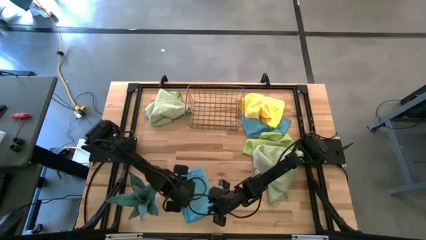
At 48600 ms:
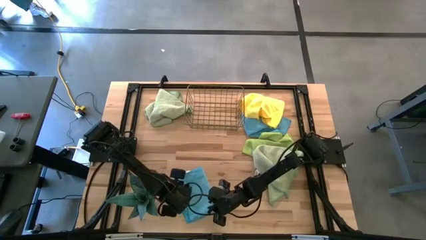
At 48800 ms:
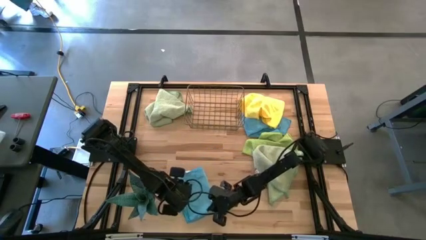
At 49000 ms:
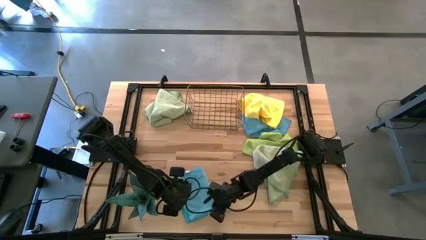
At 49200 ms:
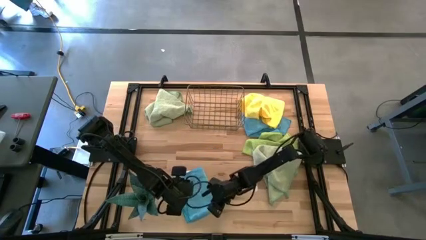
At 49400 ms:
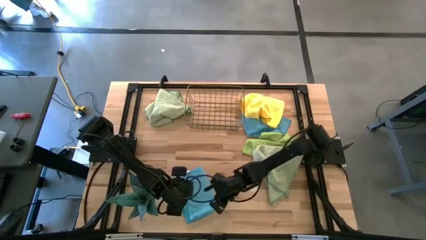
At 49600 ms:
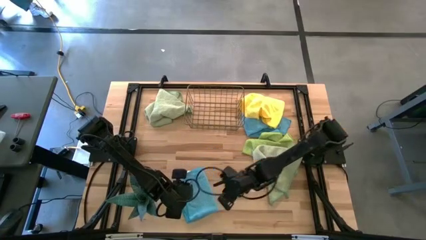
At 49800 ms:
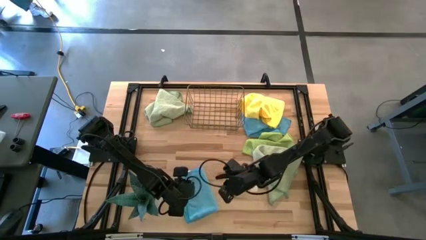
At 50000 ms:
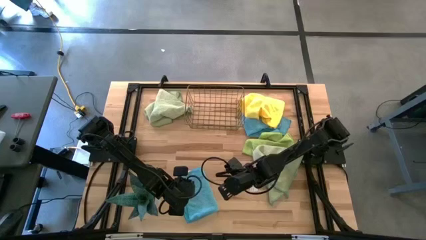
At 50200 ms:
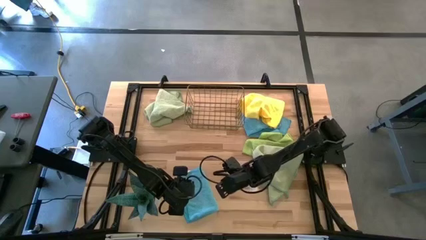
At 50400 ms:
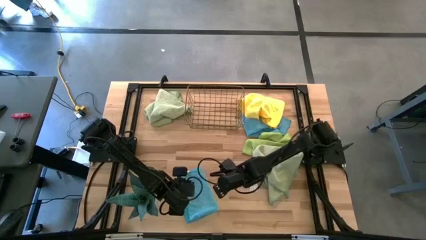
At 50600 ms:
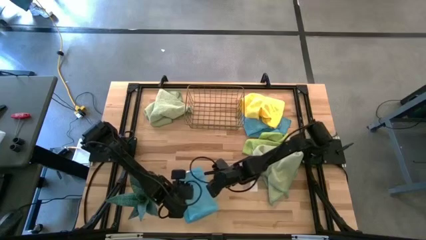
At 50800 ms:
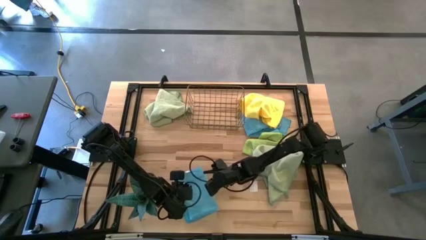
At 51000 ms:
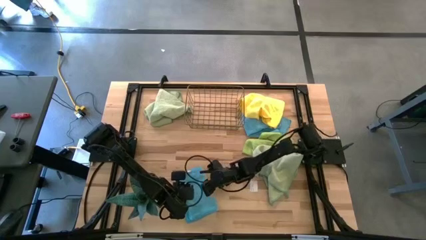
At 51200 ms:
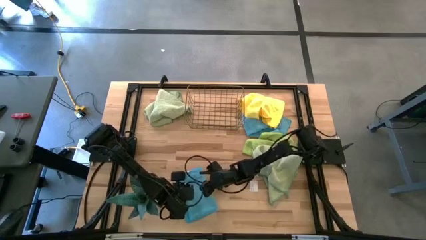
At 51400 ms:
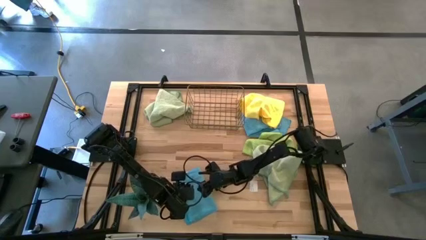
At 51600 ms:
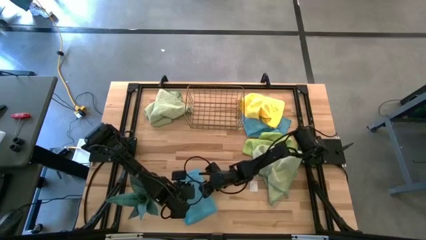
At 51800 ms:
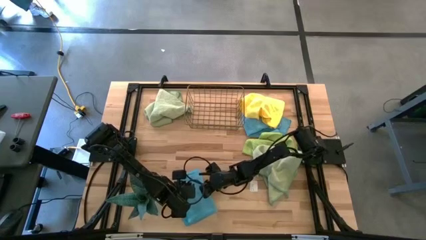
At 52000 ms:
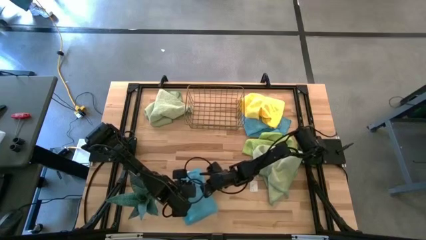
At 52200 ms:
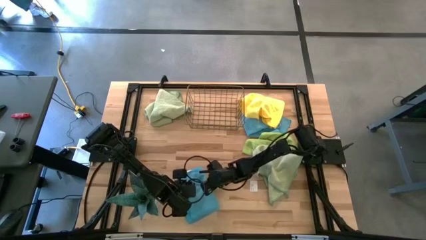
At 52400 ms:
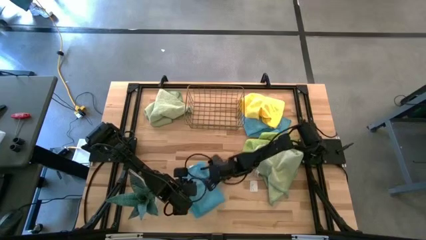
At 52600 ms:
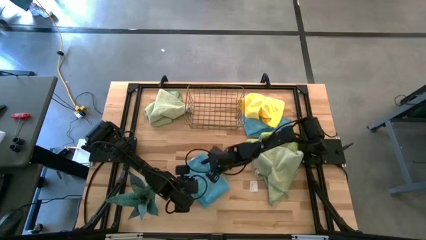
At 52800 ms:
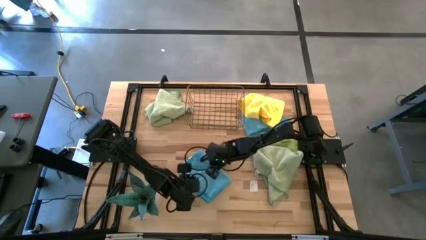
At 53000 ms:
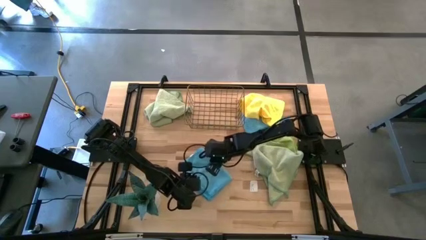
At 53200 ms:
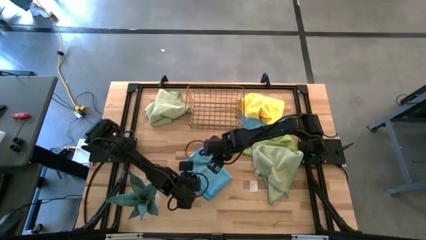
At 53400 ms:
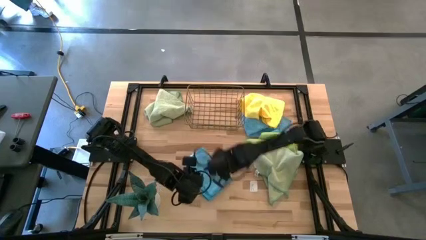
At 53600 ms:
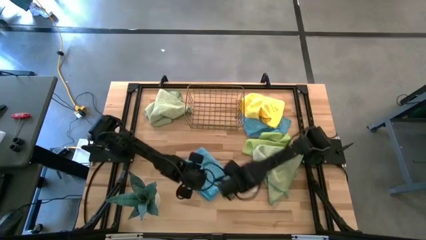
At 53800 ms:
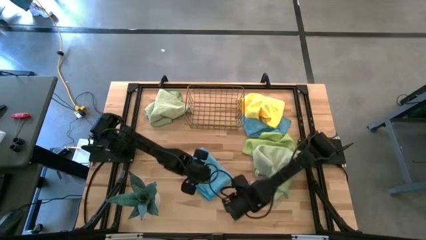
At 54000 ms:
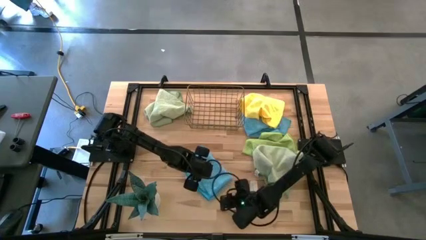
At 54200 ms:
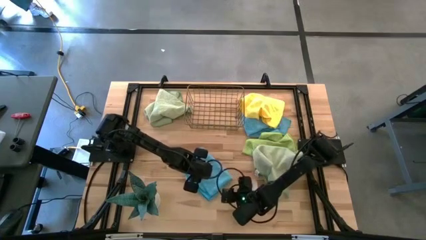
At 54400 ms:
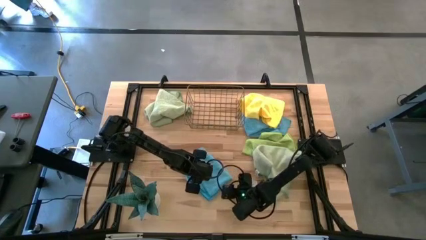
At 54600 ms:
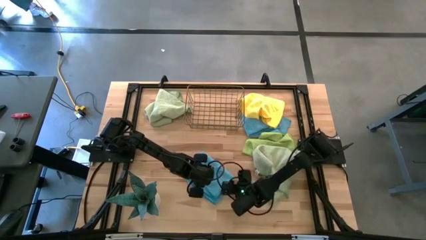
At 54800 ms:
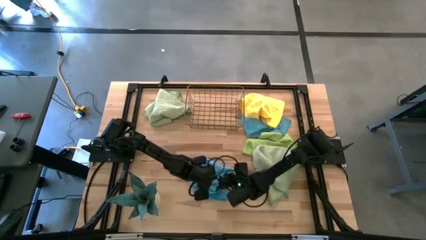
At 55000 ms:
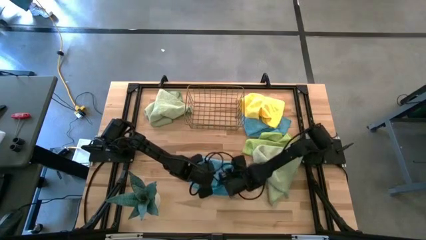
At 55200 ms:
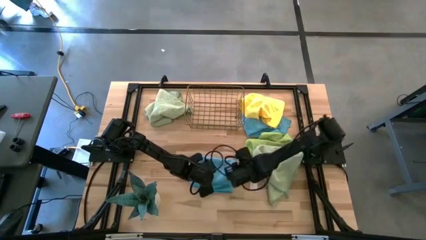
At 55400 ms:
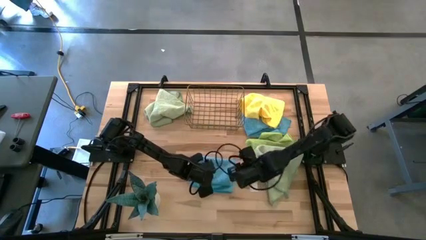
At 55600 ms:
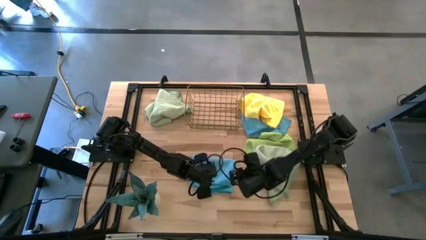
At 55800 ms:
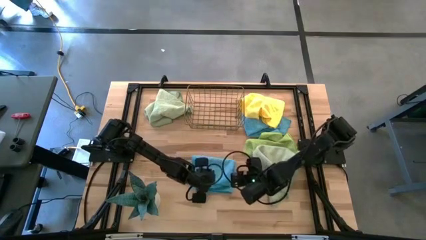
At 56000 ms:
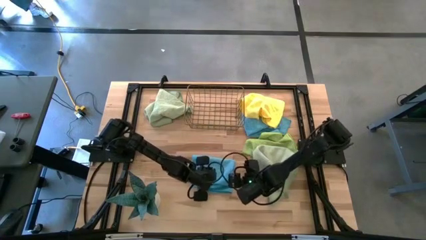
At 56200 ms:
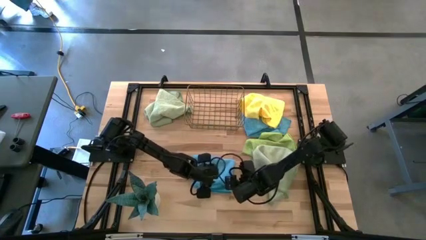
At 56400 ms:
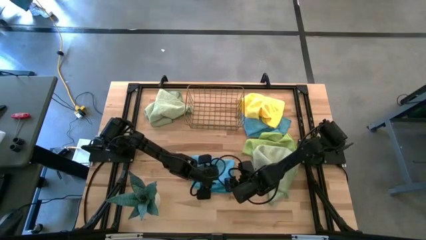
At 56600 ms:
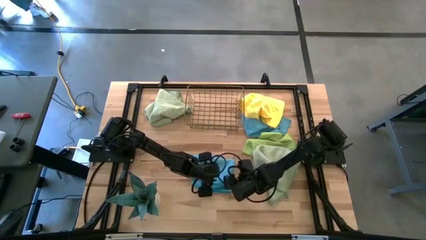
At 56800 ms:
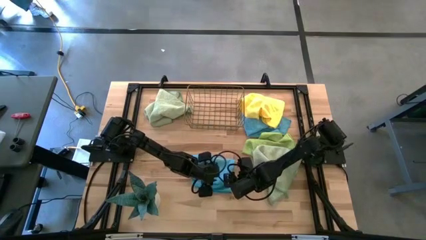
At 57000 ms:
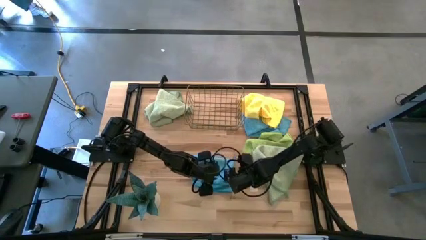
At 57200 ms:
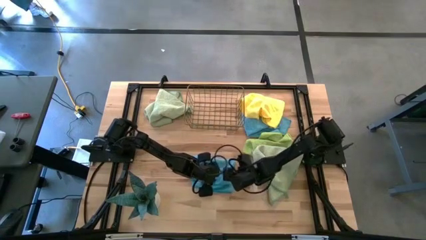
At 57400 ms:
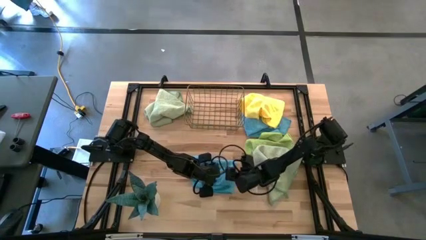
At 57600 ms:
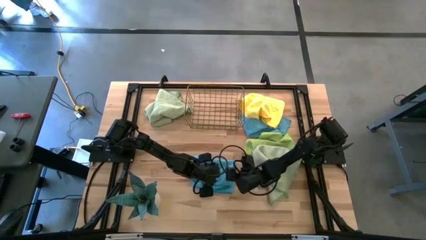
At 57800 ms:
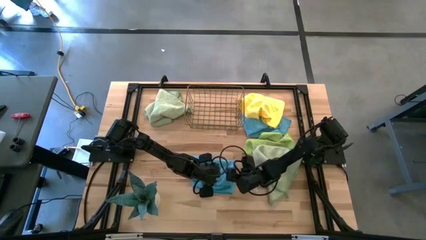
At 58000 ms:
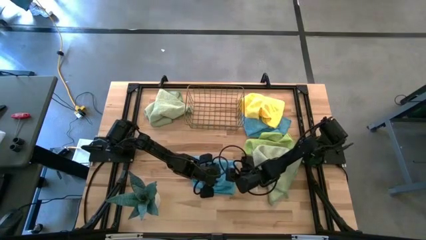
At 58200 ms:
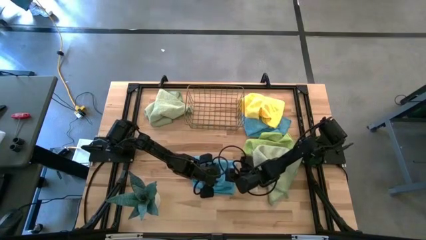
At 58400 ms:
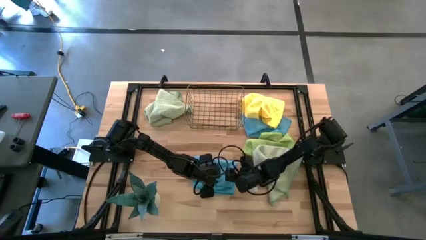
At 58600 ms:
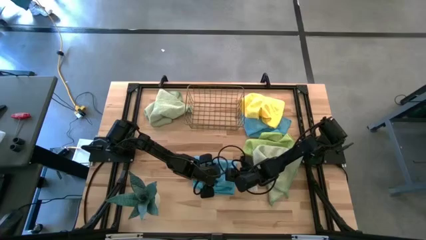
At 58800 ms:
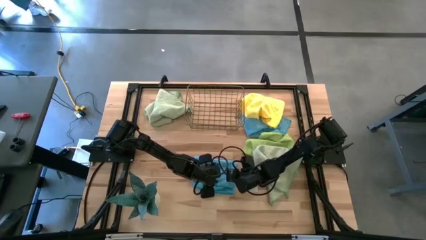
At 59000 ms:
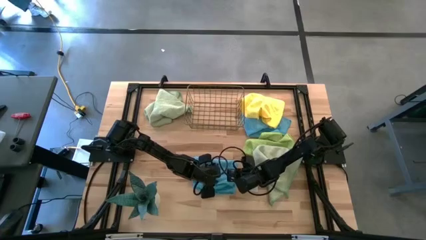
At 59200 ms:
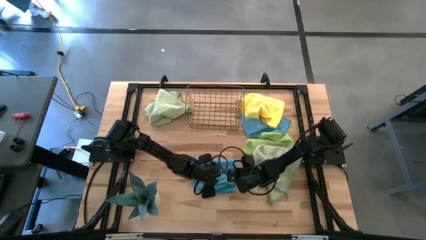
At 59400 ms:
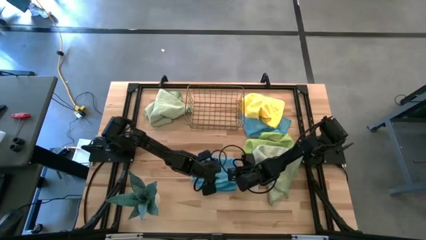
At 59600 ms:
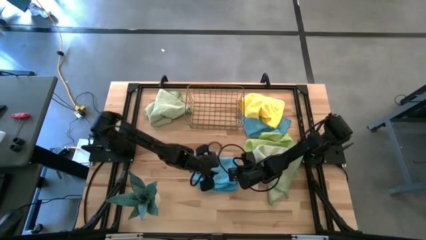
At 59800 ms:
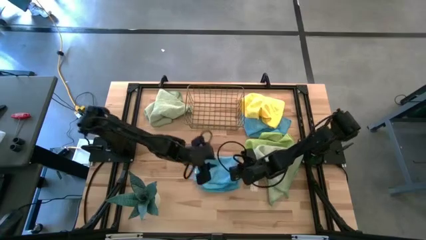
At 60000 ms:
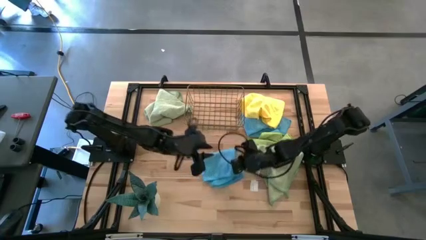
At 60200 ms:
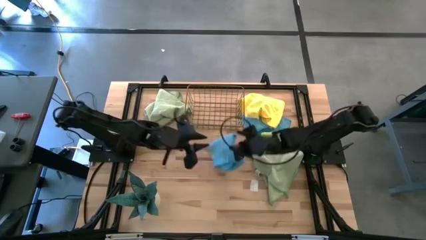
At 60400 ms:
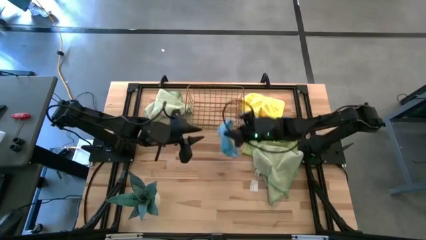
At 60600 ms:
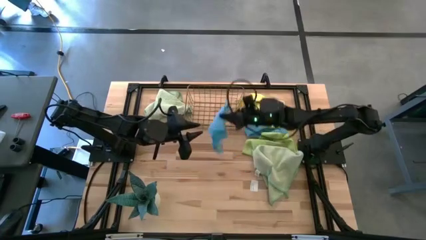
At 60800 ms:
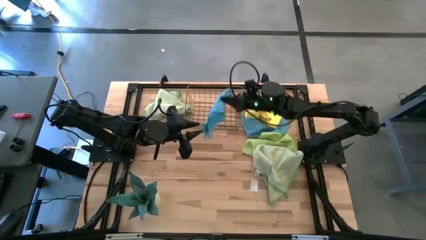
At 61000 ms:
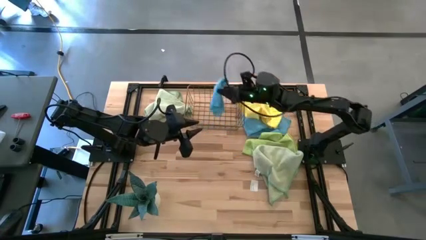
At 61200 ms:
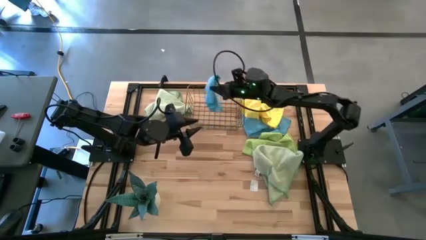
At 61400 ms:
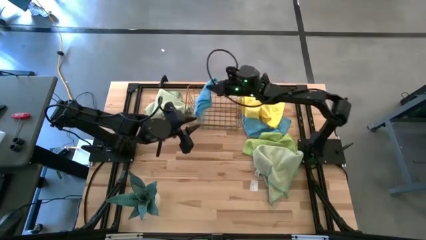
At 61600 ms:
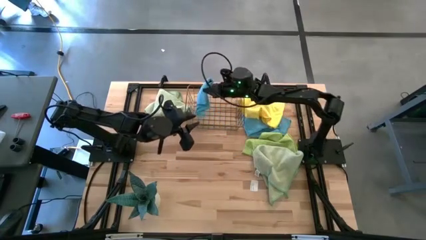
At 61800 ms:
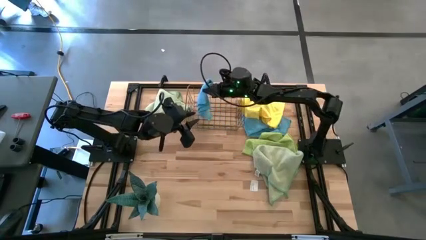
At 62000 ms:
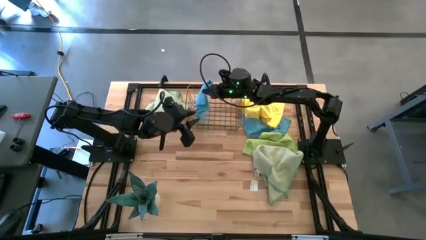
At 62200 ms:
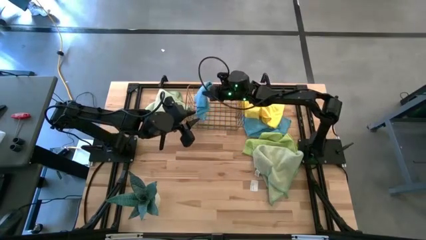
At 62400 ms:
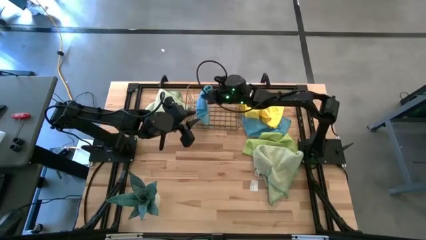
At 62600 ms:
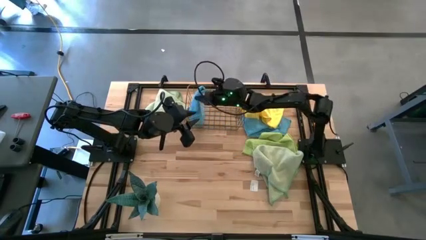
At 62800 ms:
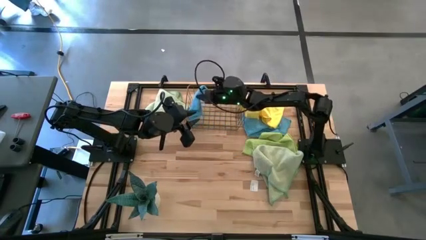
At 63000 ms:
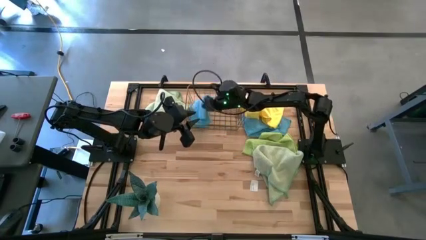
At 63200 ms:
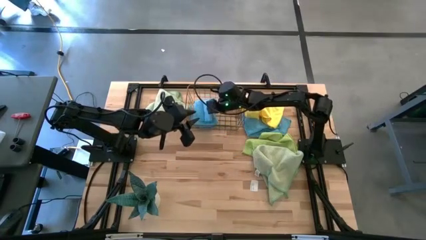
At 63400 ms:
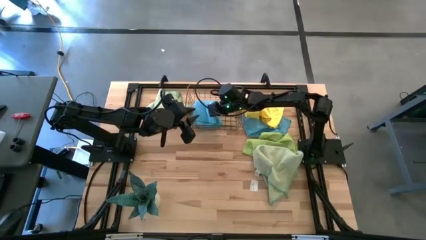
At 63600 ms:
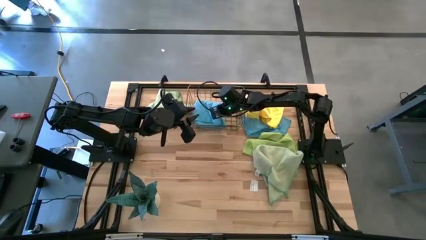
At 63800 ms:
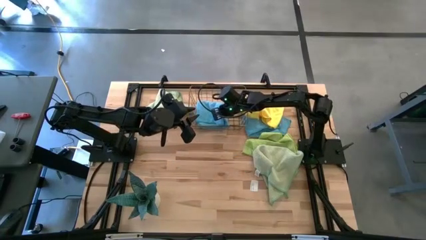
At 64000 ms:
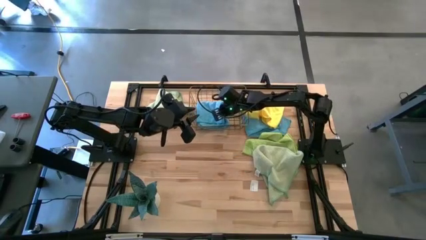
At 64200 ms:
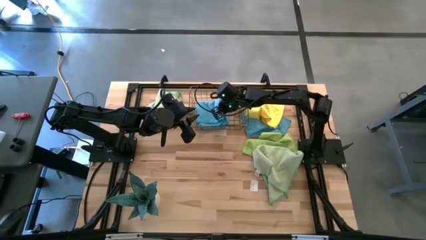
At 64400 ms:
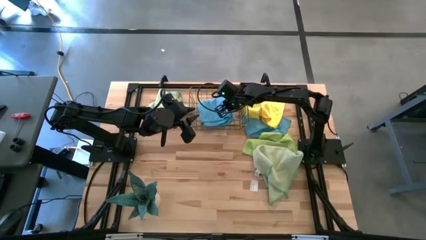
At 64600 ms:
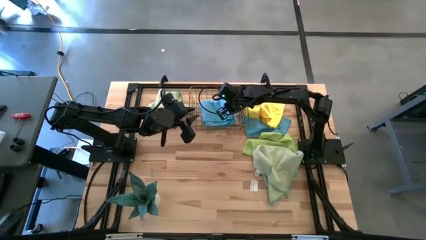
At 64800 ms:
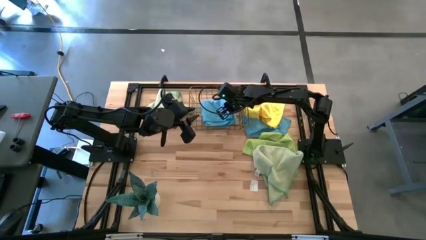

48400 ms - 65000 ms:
Task: Fold microfiber towels
Put the left blue towel in the wire basket
